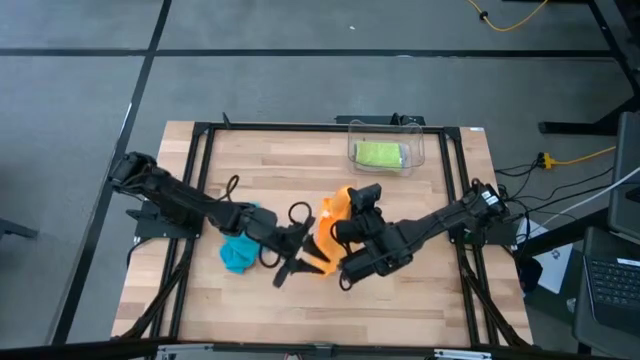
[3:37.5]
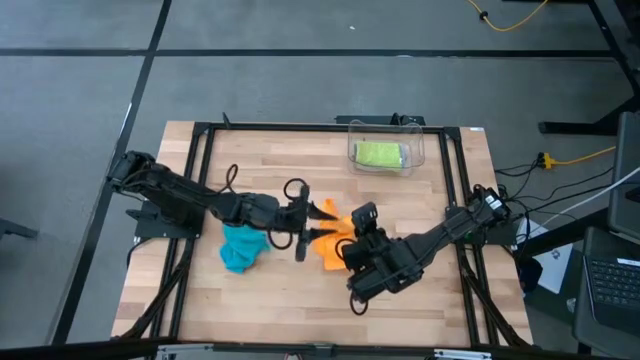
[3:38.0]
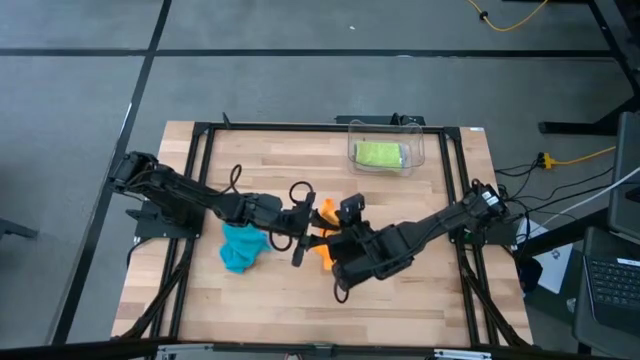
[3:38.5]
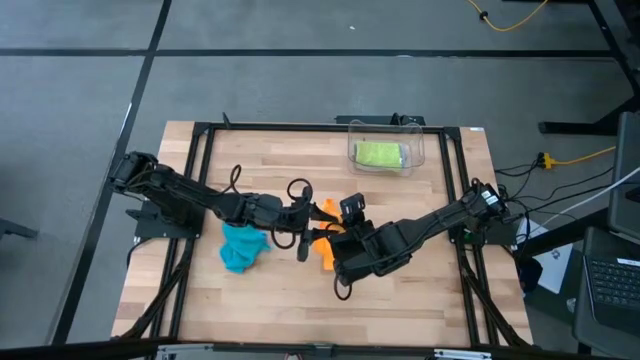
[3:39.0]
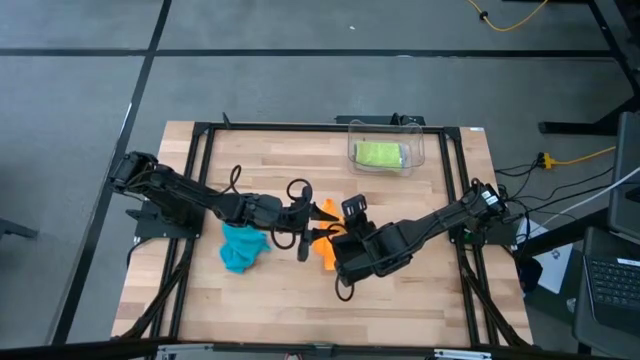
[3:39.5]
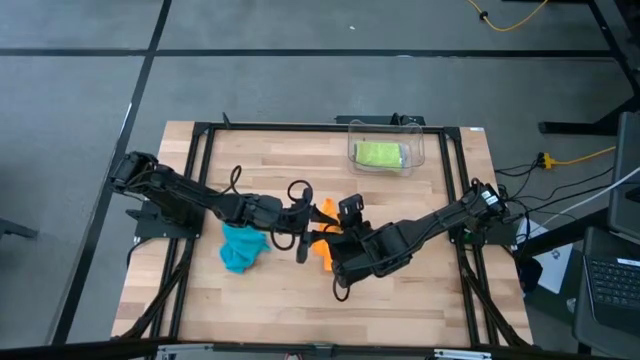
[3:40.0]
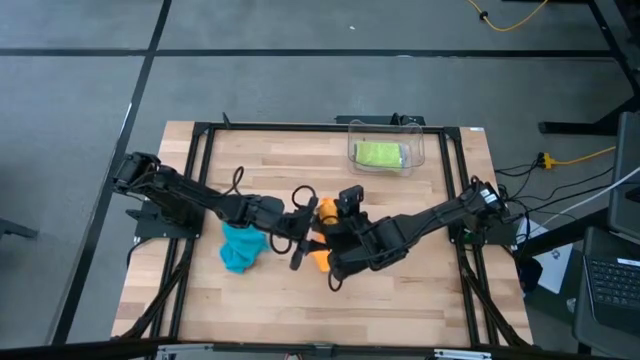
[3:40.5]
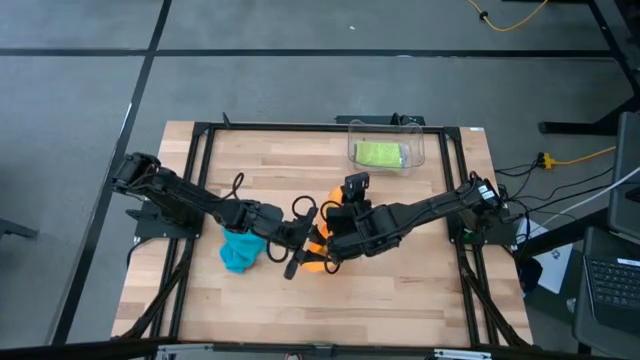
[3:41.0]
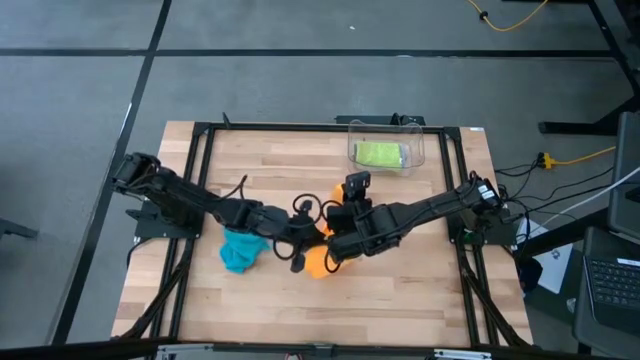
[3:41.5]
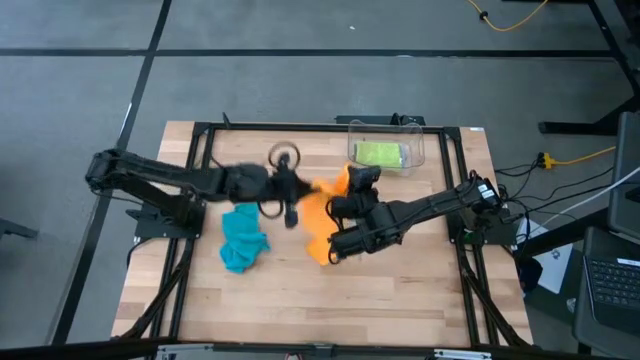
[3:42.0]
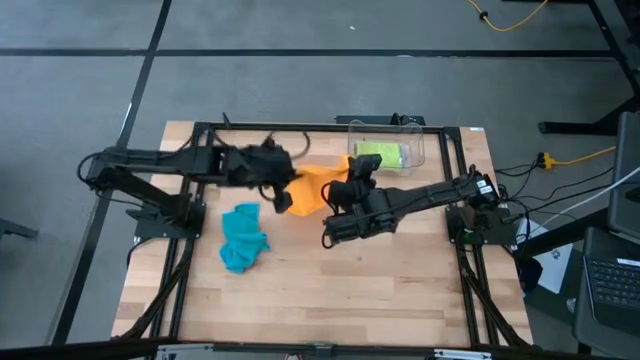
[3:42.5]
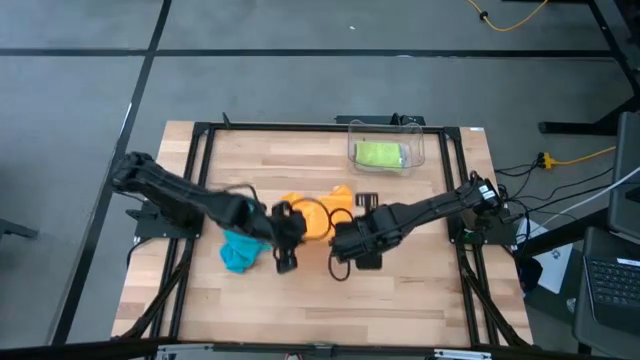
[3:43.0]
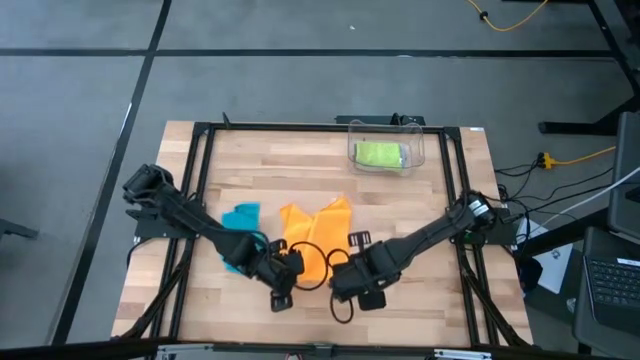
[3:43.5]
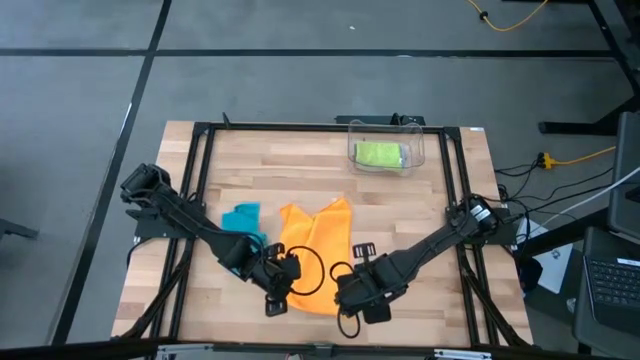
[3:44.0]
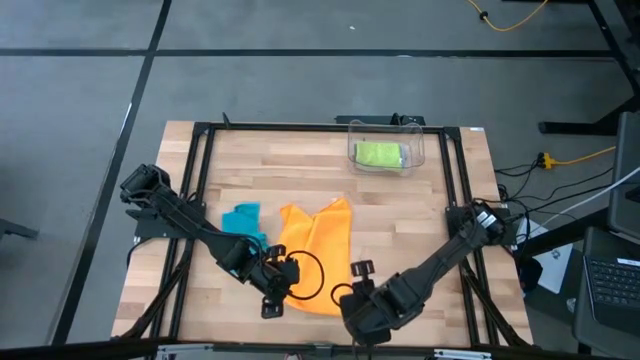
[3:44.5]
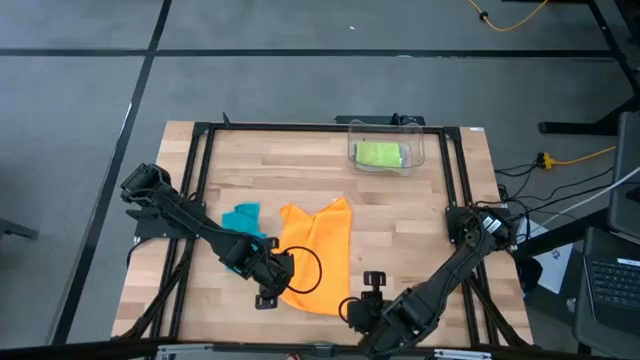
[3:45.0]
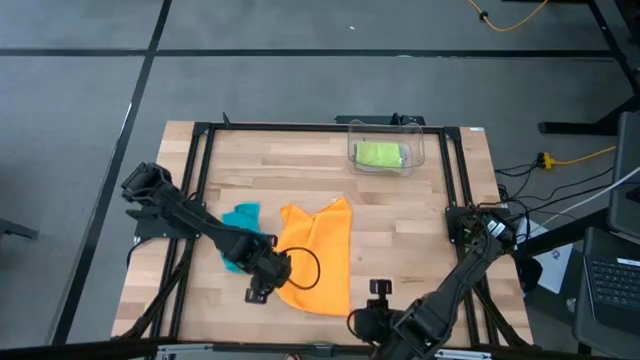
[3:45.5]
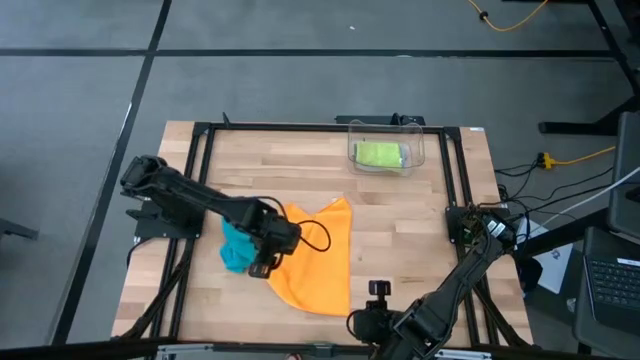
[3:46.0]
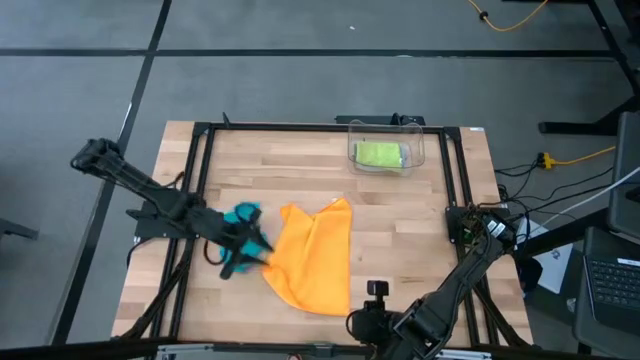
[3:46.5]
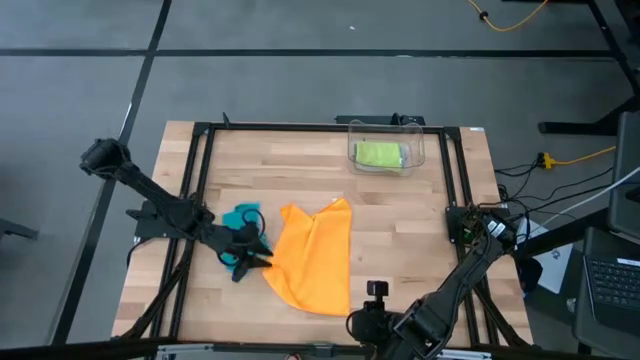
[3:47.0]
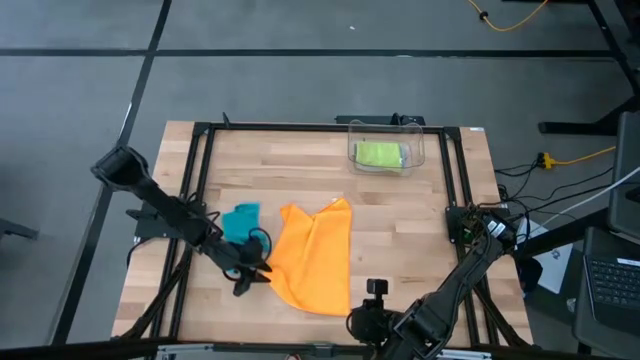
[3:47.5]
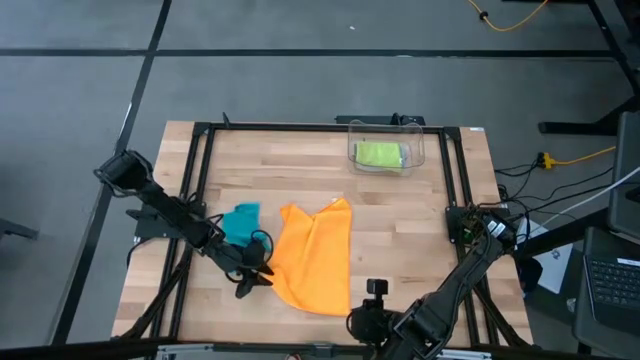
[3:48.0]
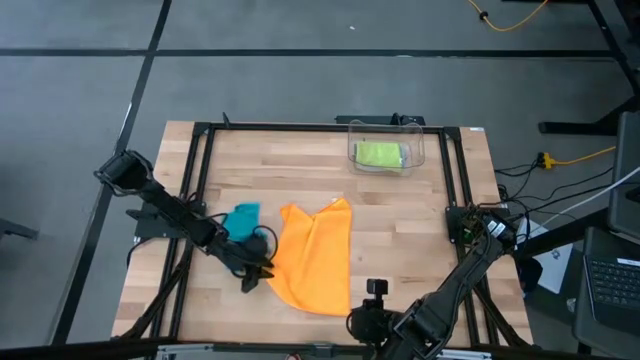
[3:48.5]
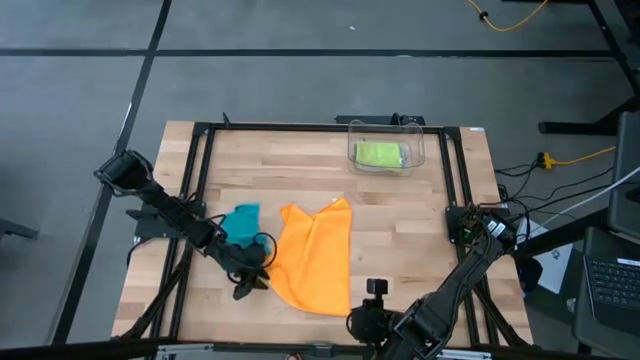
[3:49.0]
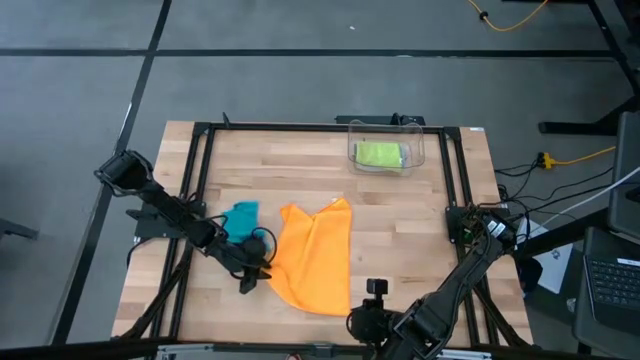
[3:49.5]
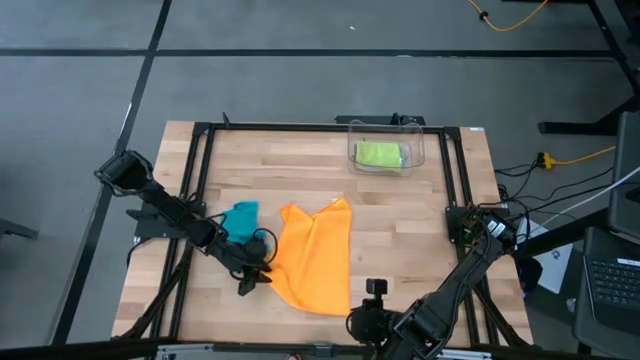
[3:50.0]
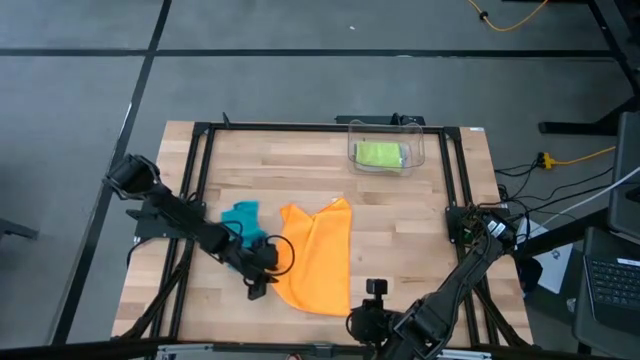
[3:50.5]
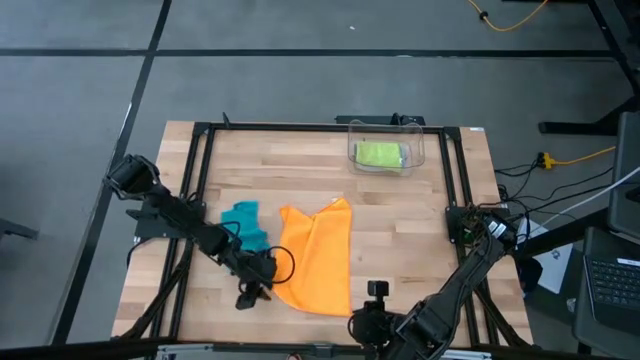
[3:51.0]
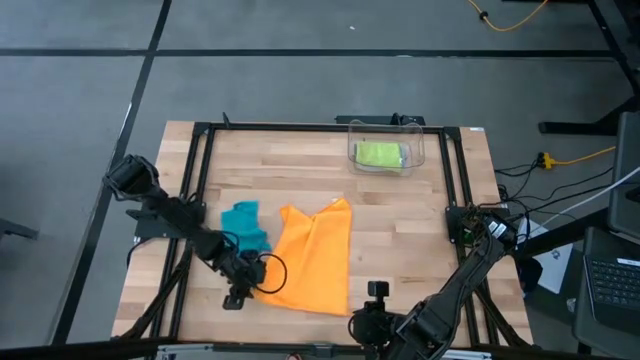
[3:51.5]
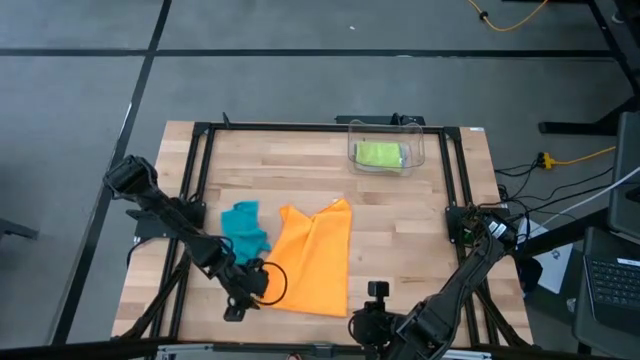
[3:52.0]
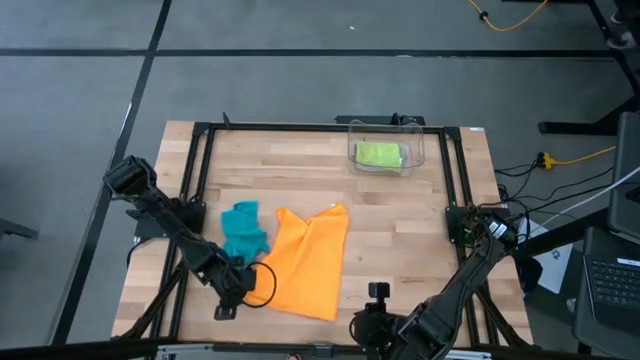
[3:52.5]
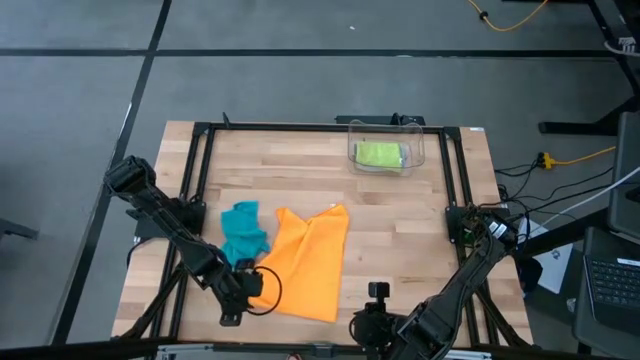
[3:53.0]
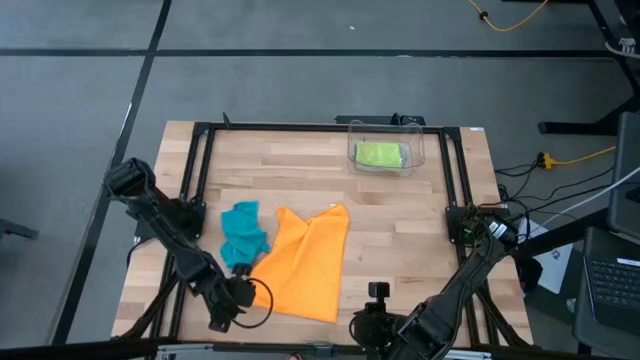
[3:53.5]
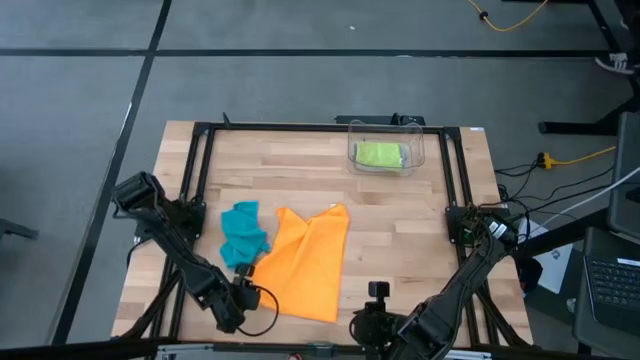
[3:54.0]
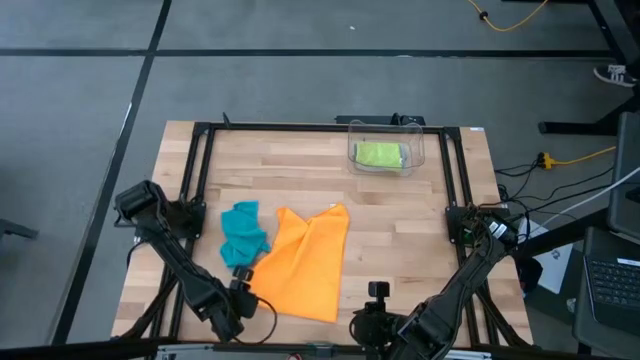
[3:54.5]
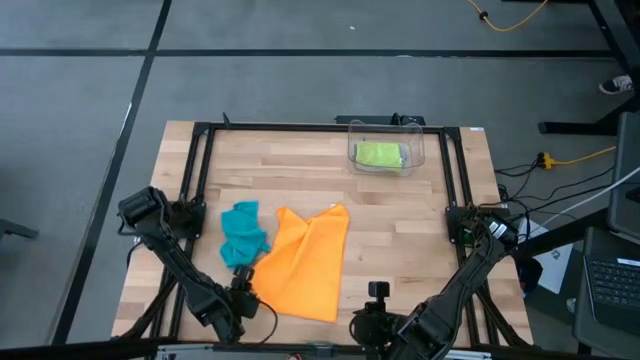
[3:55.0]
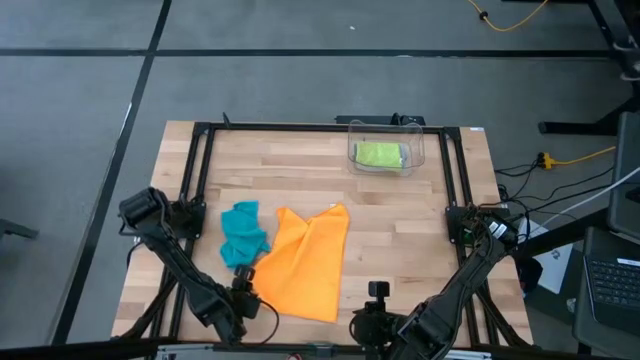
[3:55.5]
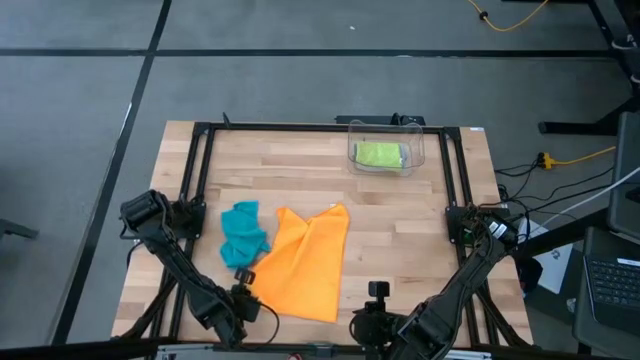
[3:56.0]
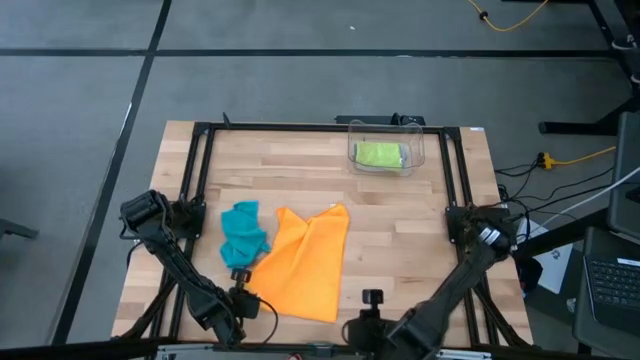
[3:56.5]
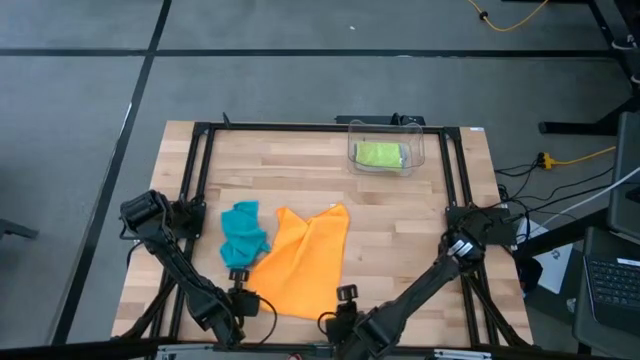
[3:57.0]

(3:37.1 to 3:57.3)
Task: Fold microfiber towels
Fold the orange microfiber

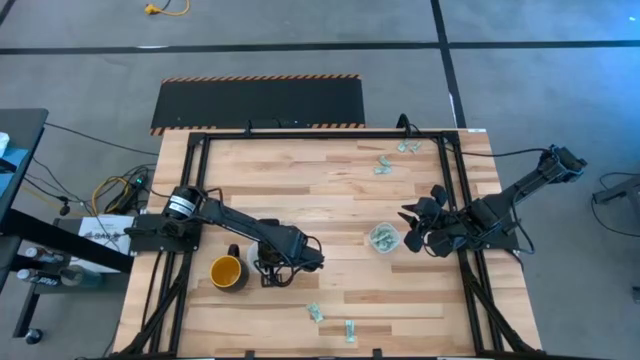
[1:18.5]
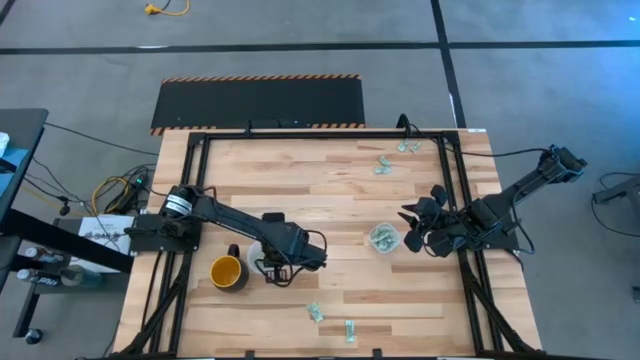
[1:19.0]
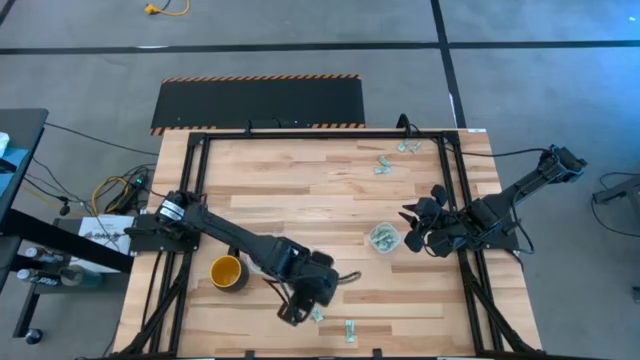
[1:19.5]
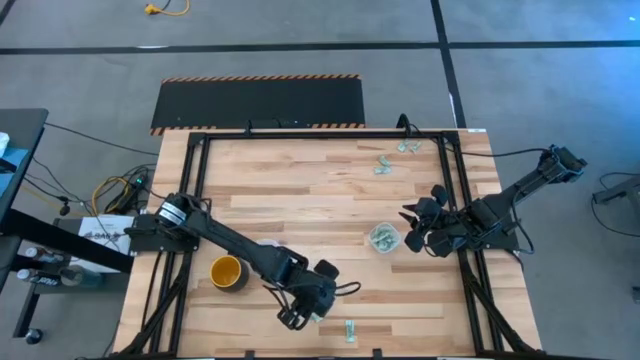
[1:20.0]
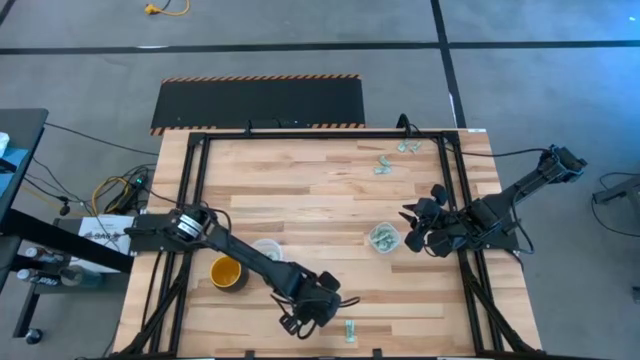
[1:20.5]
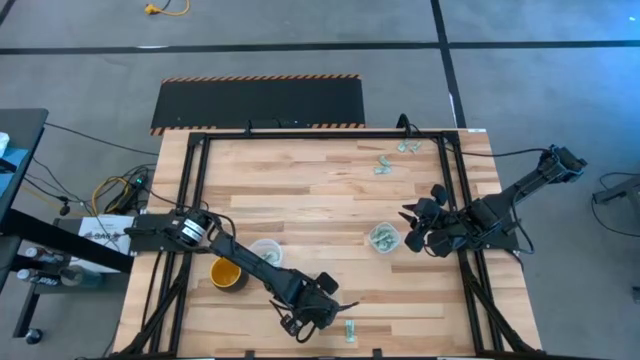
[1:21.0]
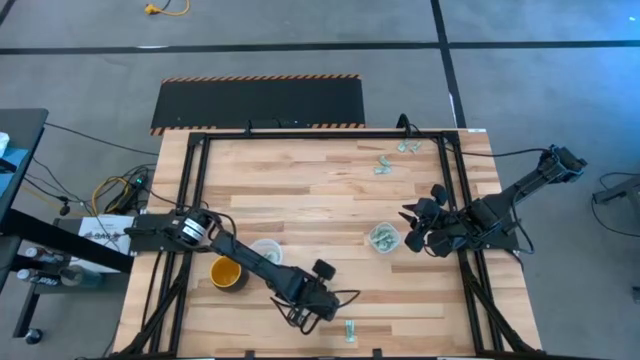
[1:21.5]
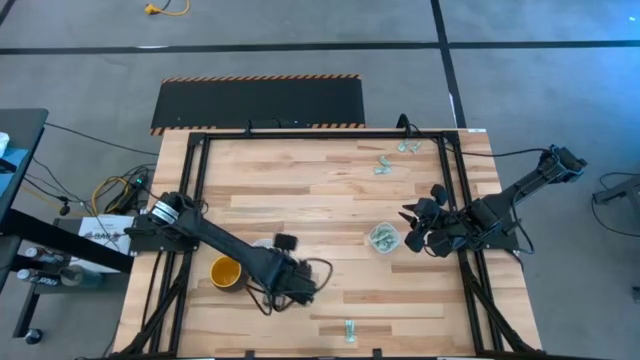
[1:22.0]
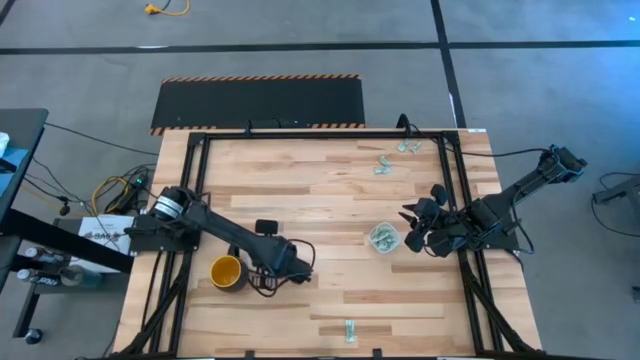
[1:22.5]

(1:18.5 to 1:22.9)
Task: Pick and place Stevia / Truvia into bins
Put the white stevia packet into the round transparent container
